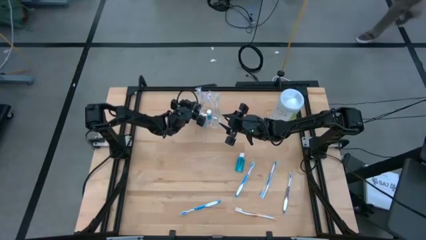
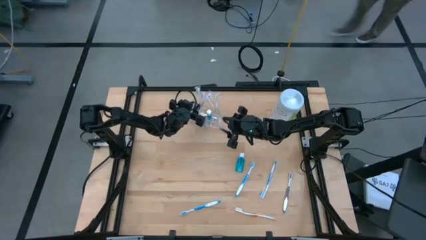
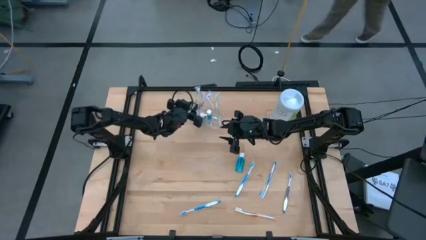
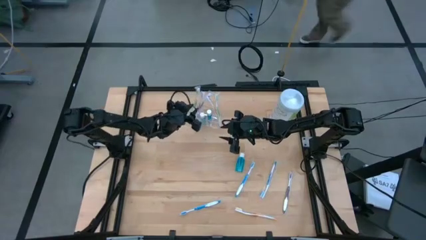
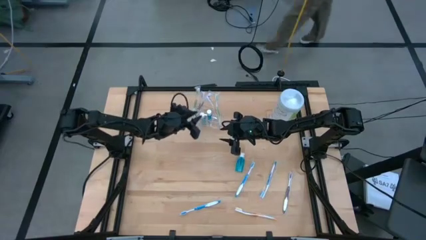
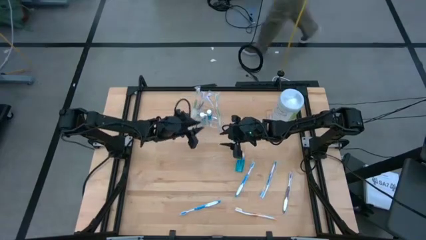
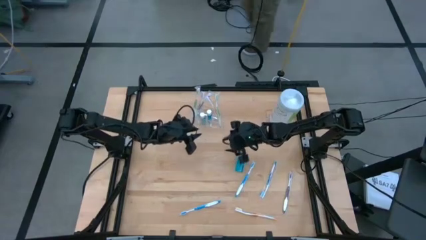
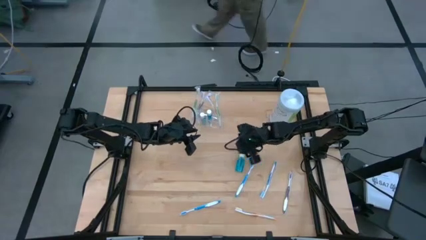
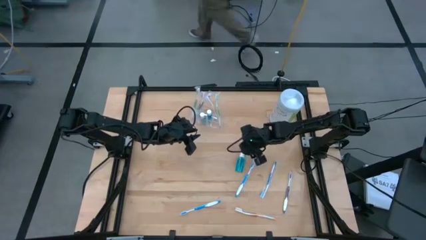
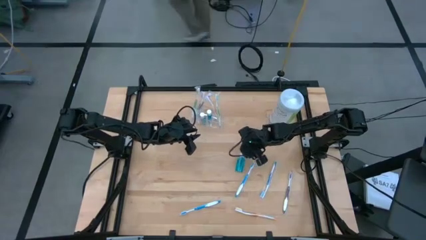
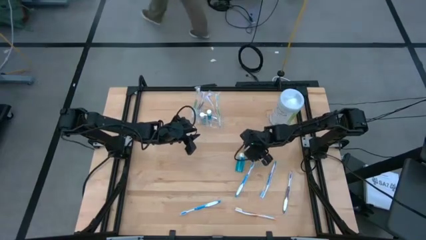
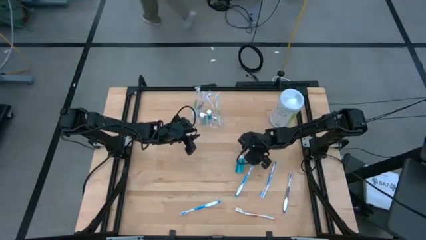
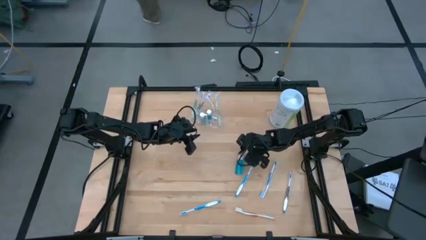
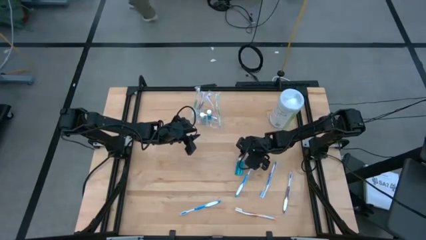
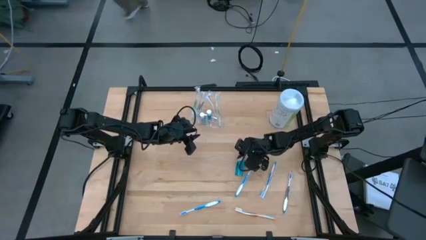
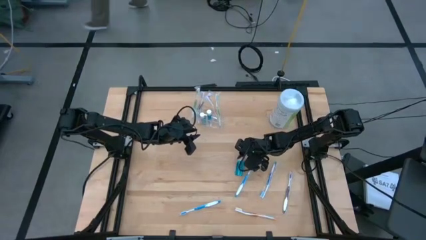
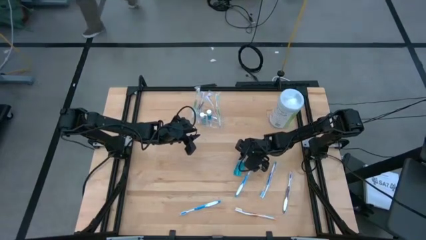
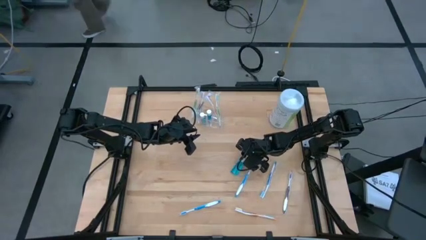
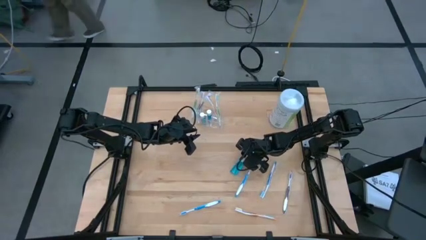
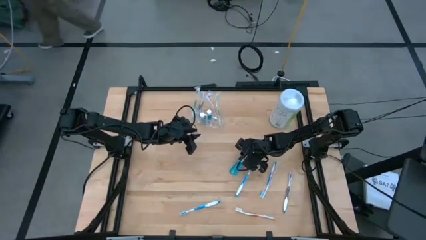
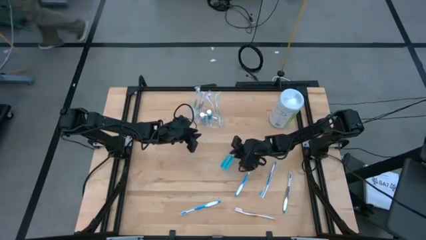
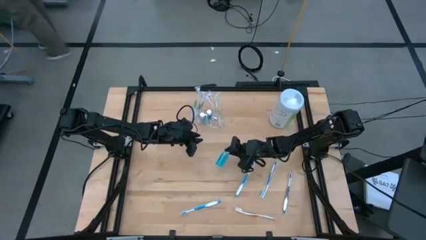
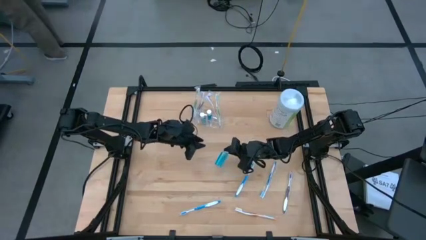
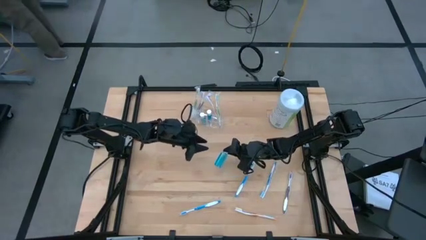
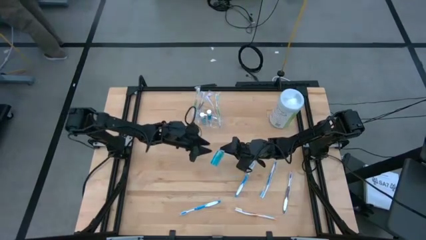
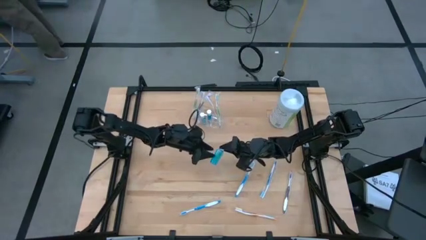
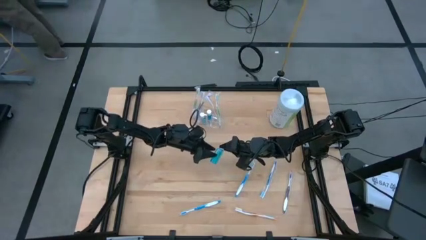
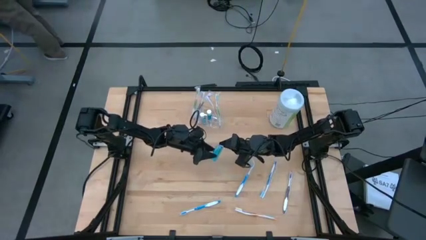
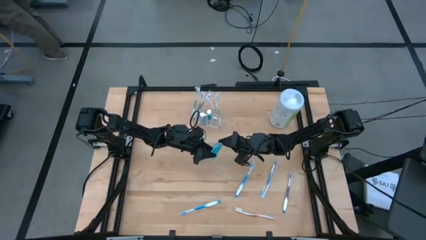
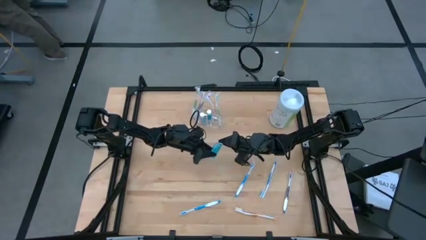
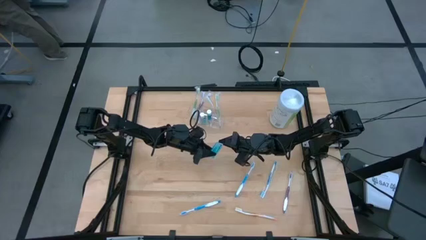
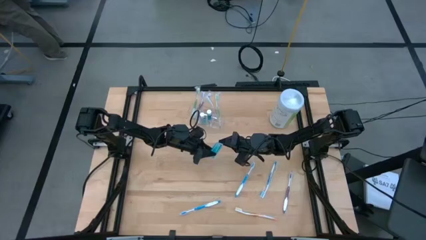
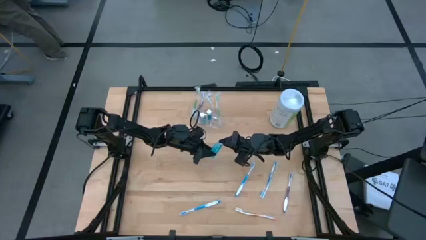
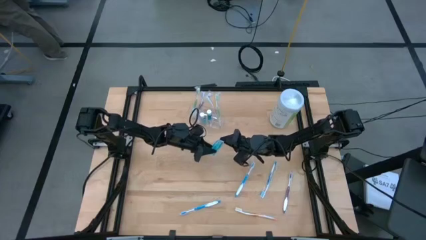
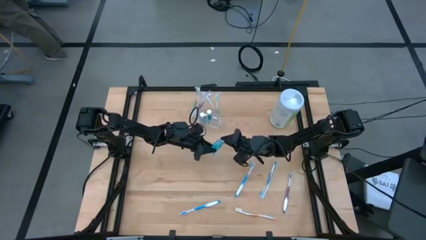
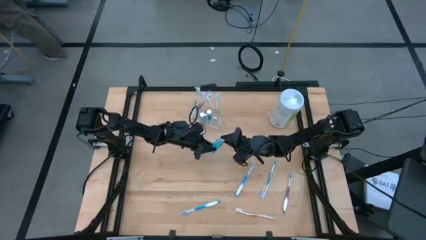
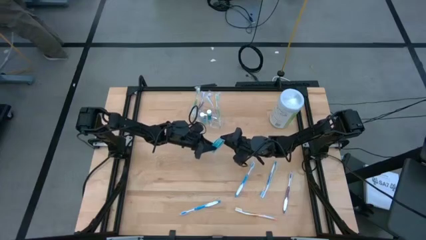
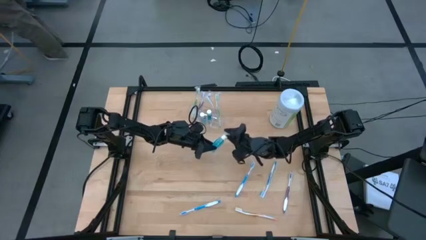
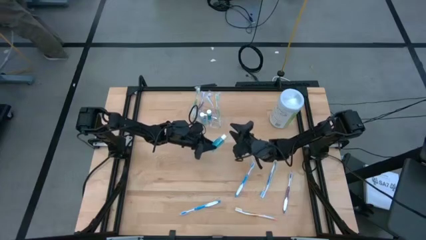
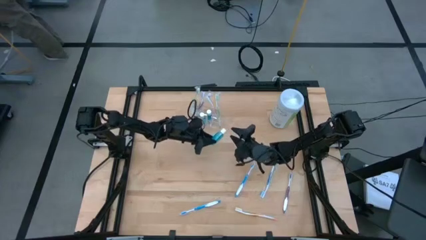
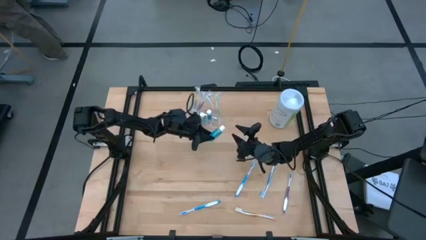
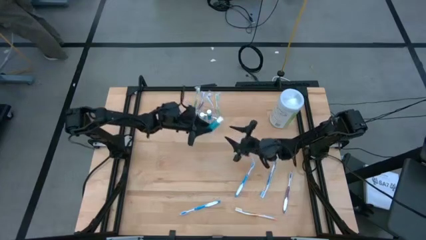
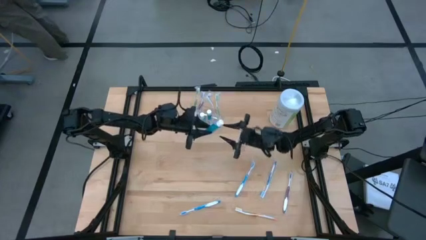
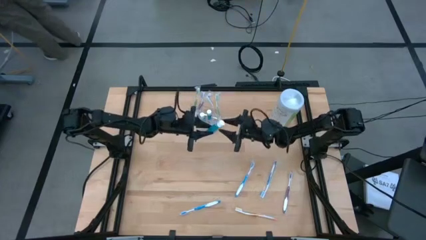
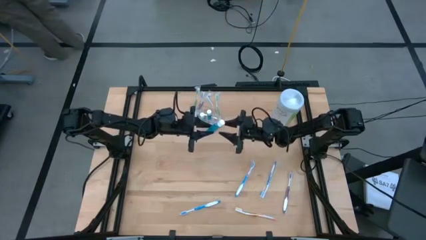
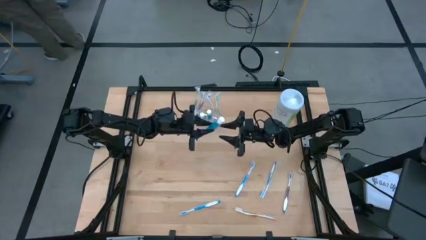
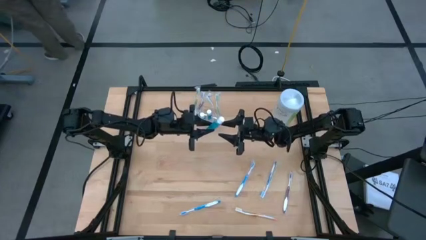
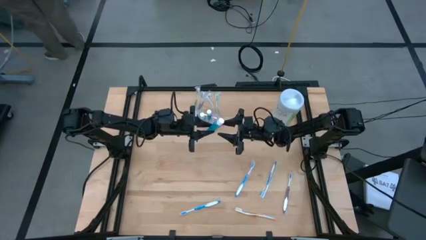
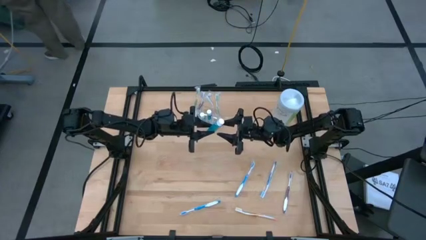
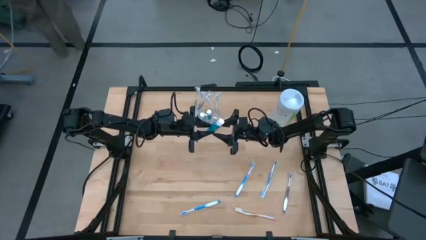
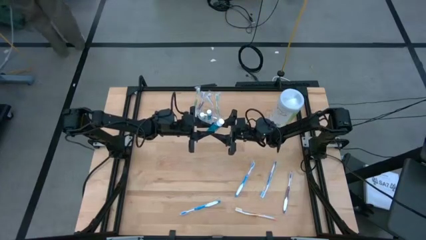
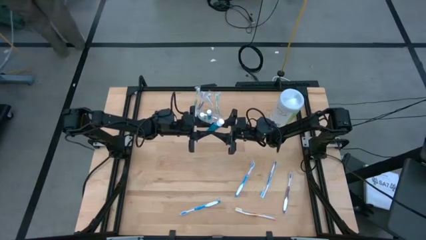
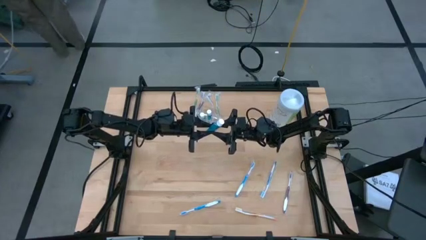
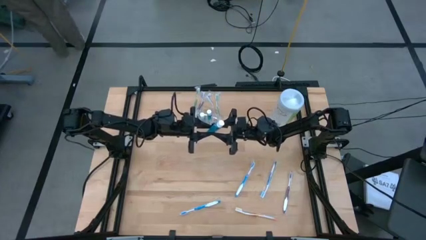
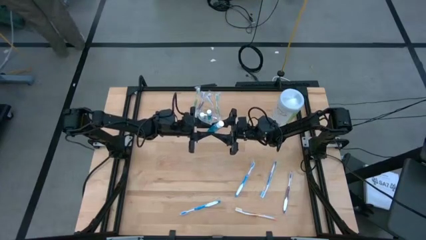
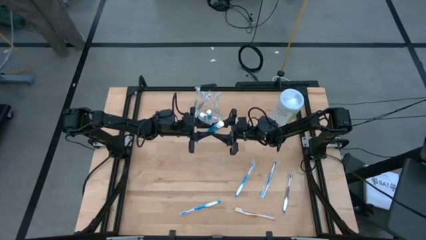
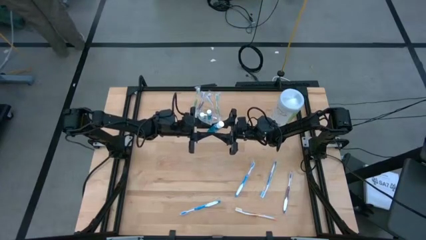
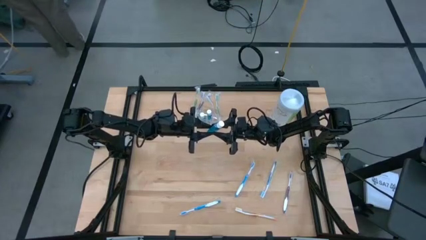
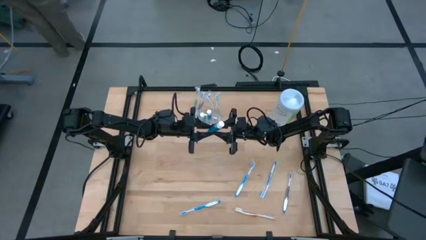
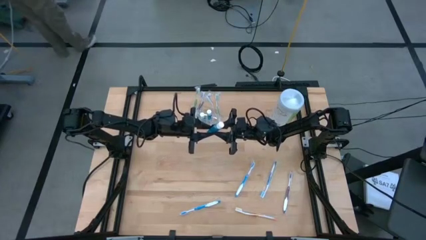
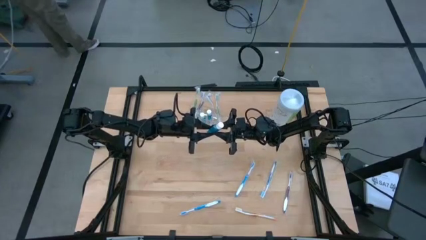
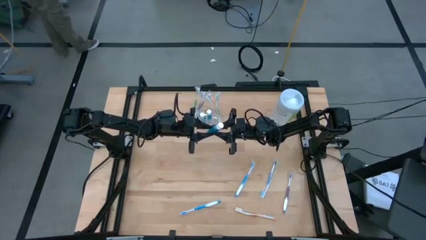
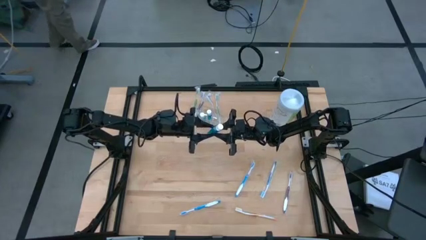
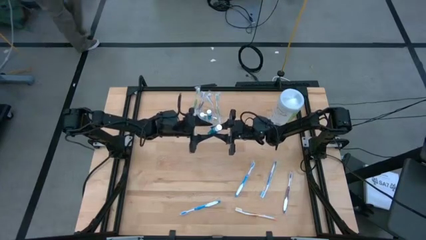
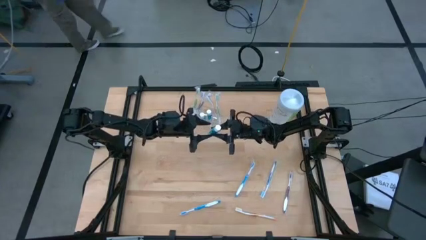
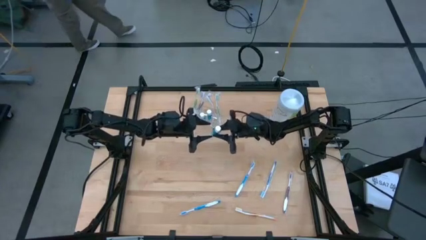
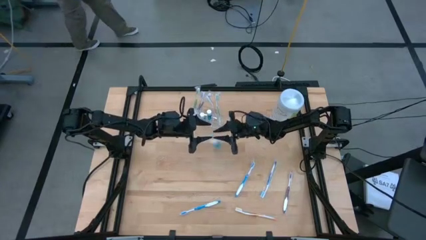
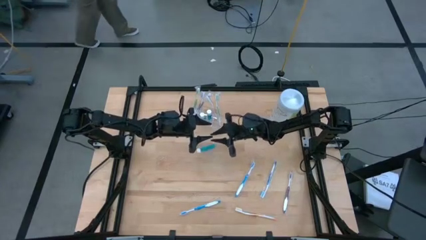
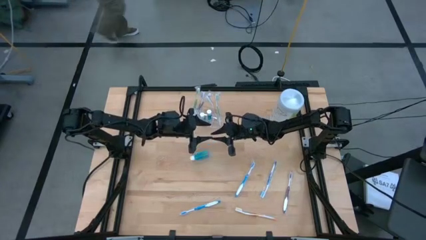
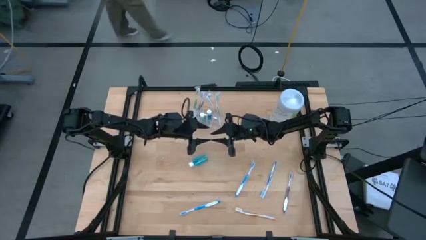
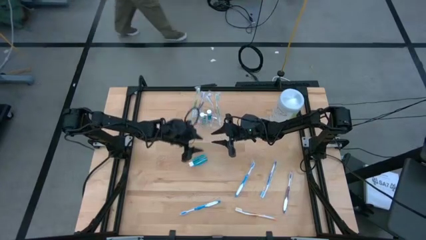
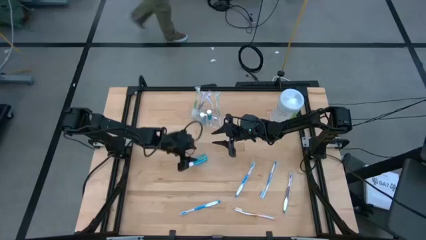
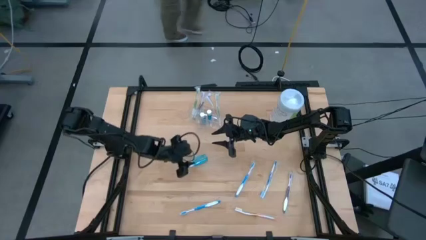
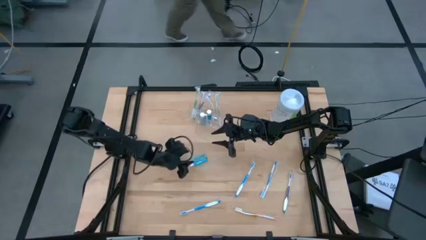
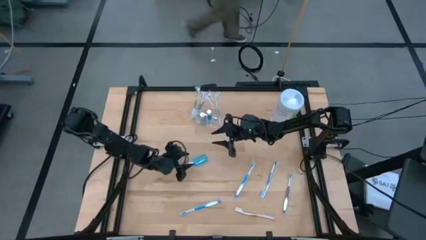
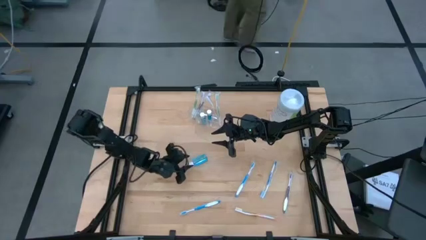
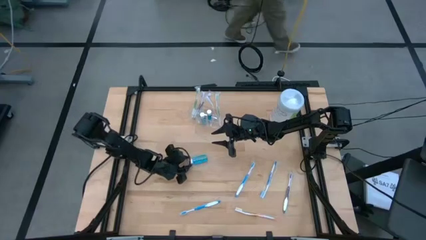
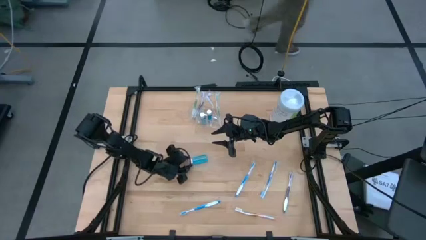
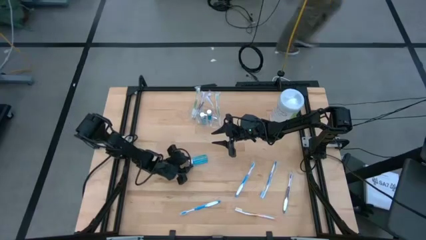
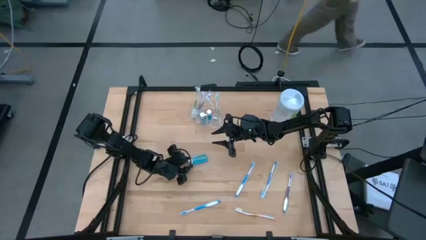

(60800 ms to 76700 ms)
Task: Pick & Place toothbrushing station
Put the mouthwash into the middle section of the organizer

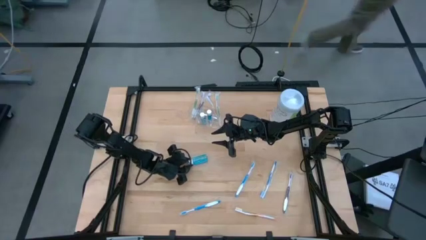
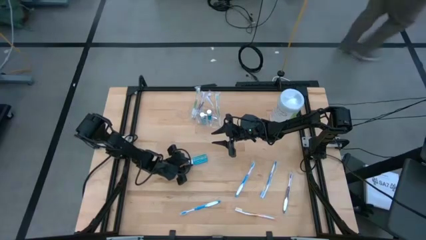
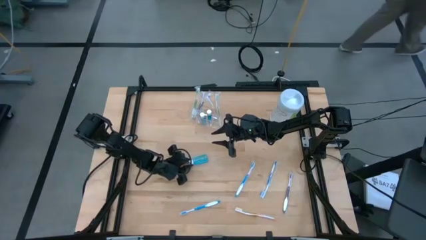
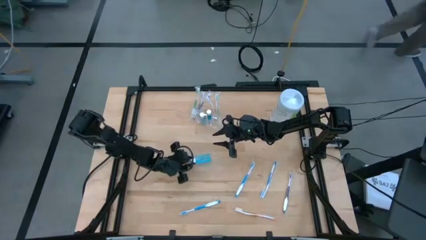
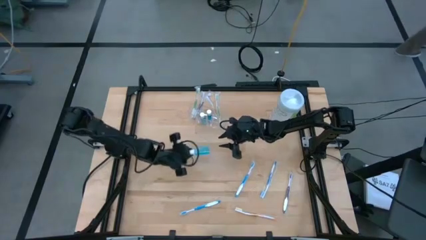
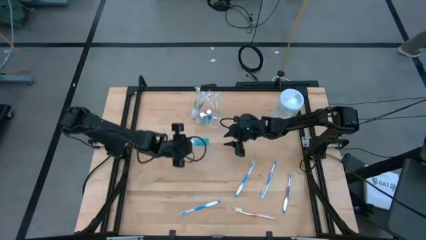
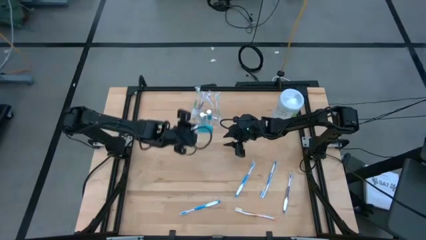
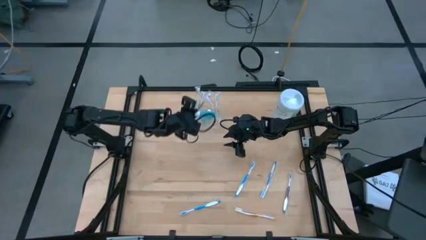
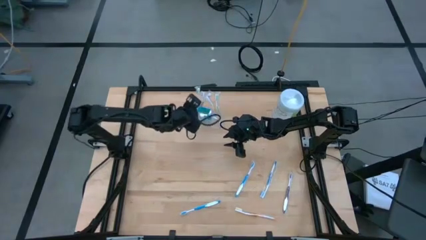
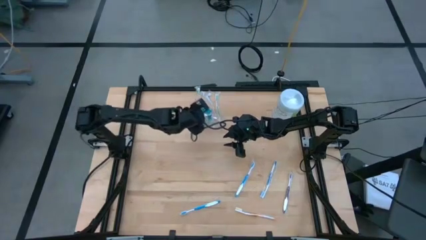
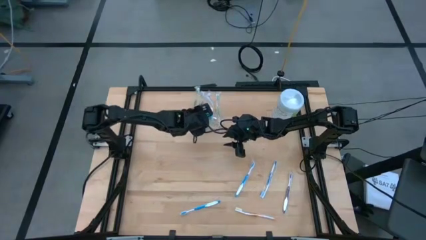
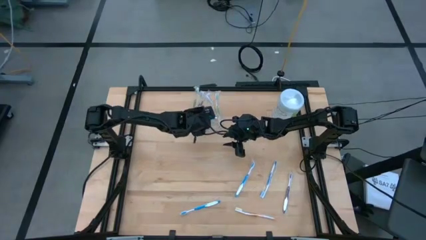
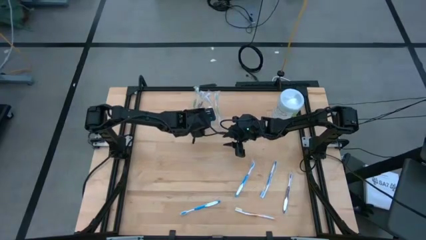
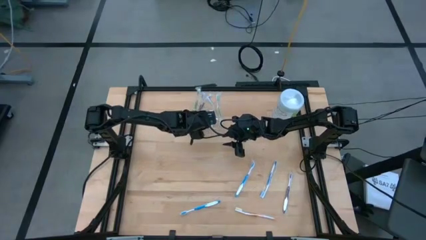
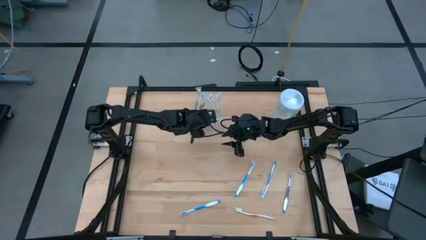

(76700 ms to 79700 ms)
Put the mouthwash into the middle section of the organizer
